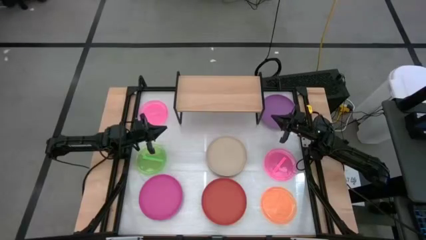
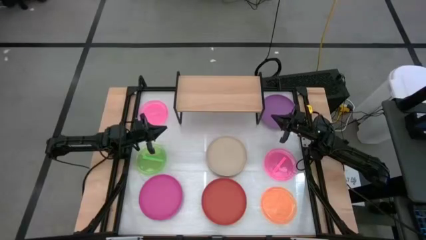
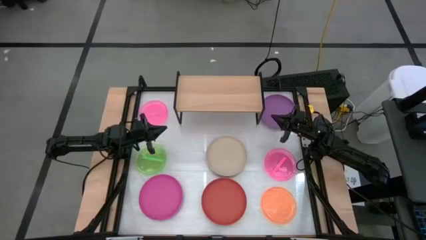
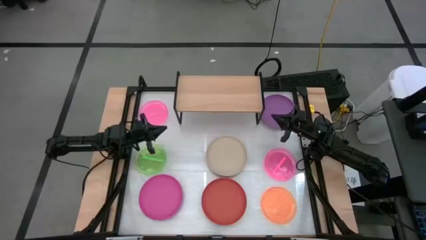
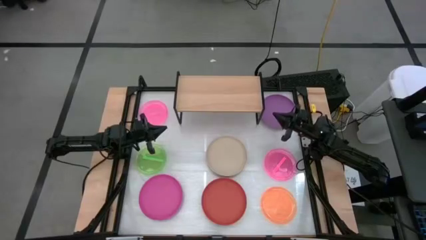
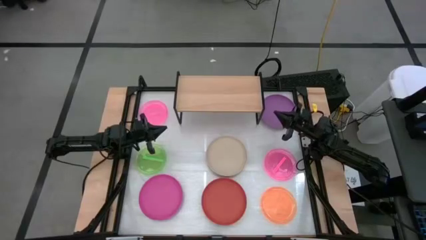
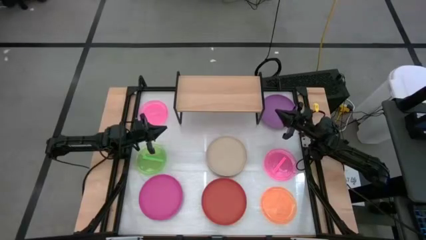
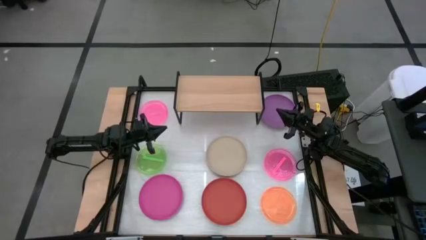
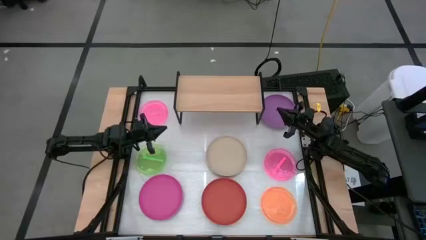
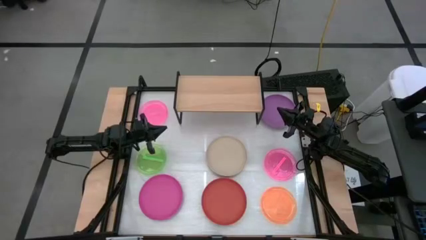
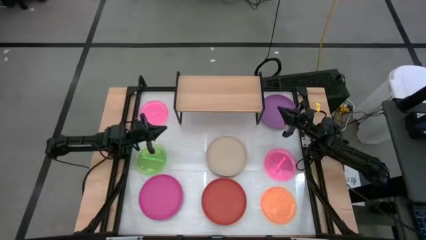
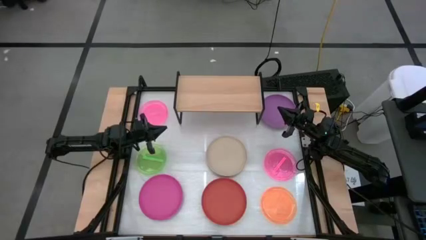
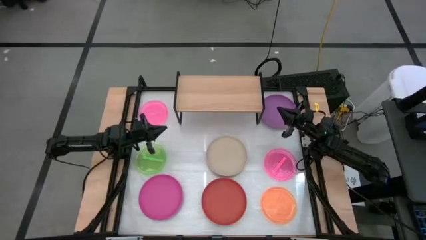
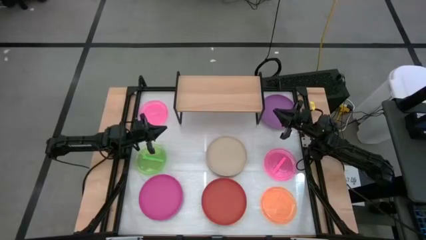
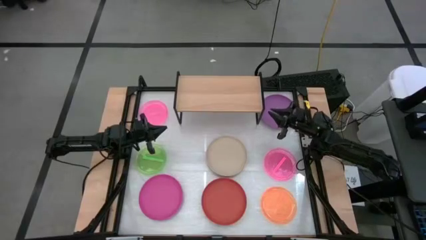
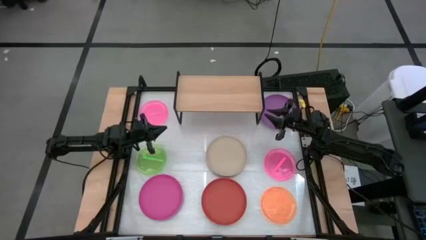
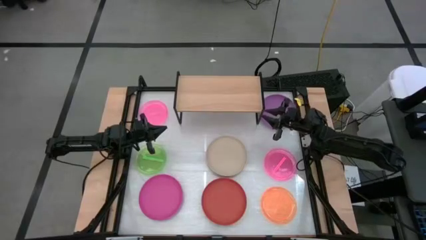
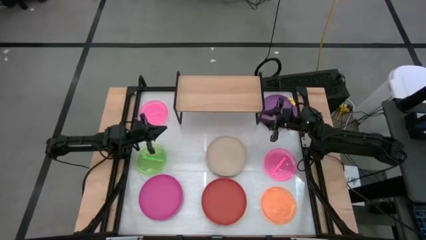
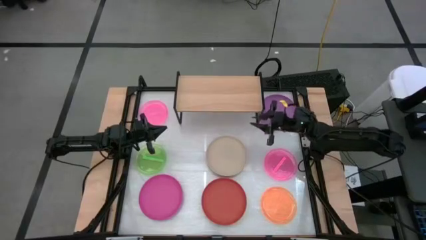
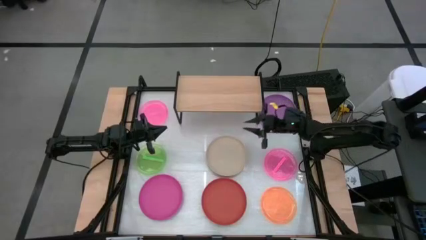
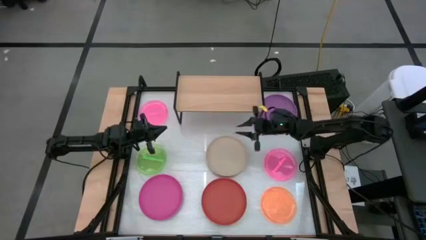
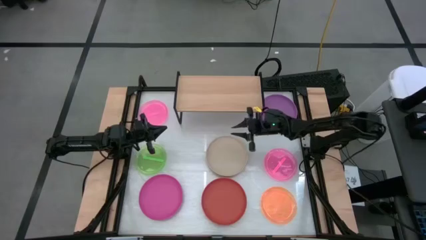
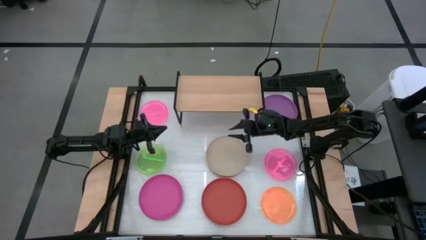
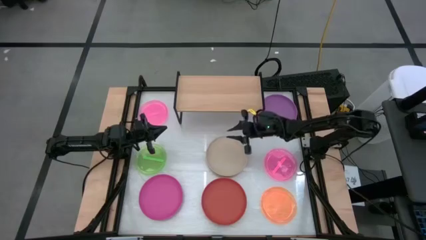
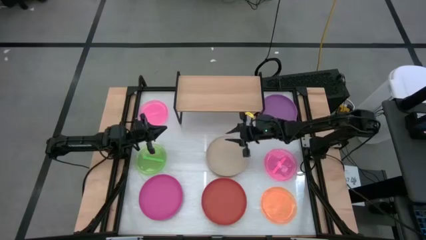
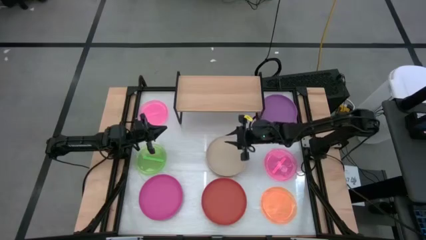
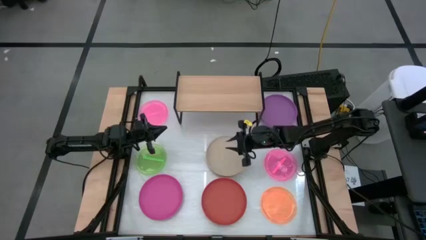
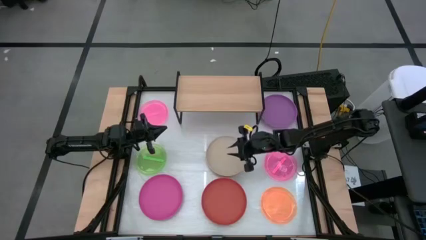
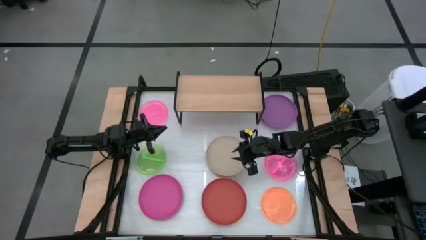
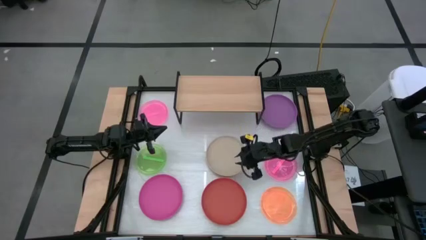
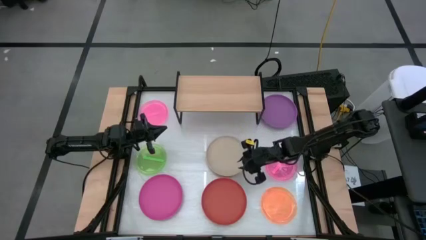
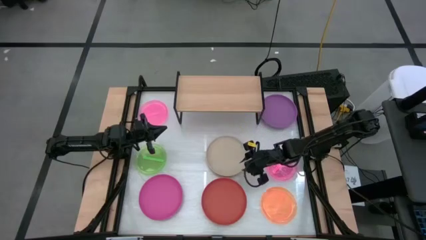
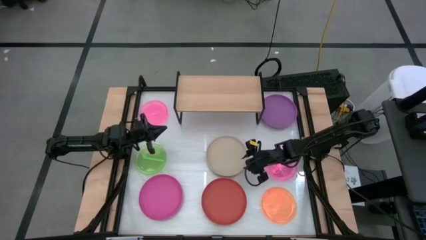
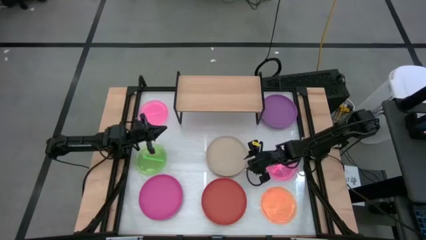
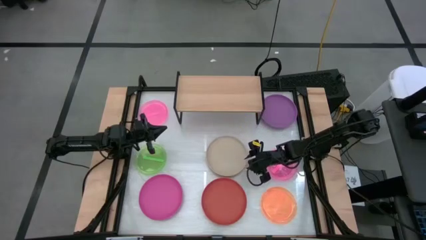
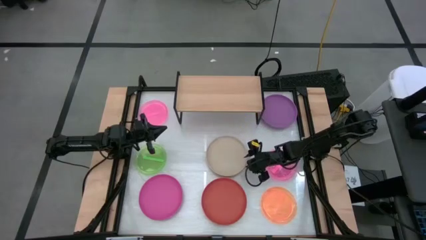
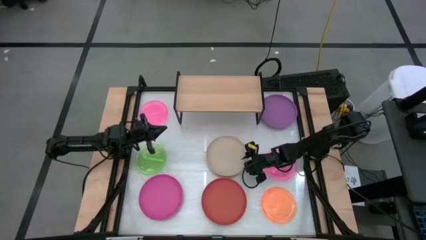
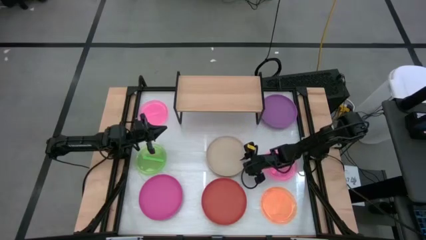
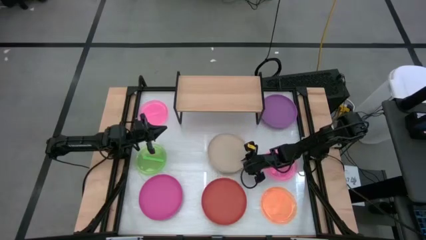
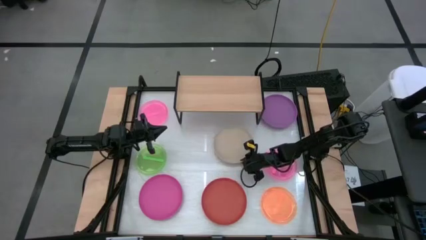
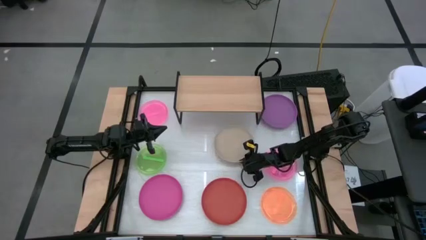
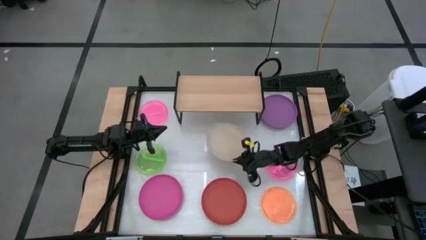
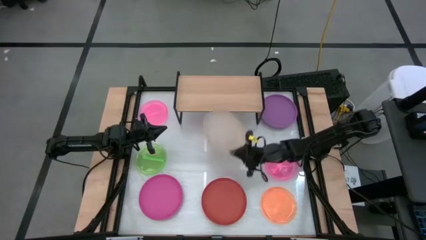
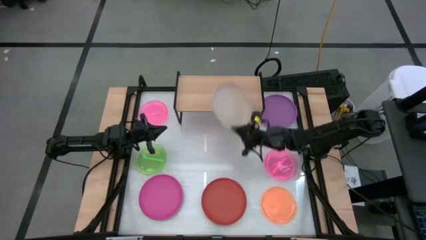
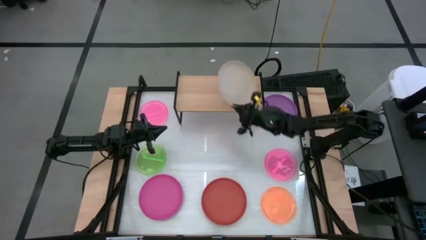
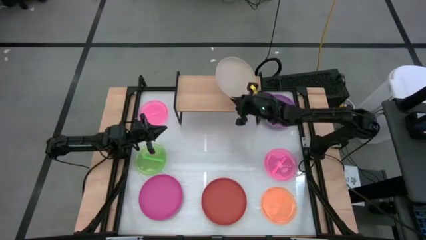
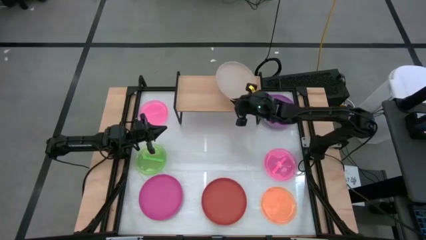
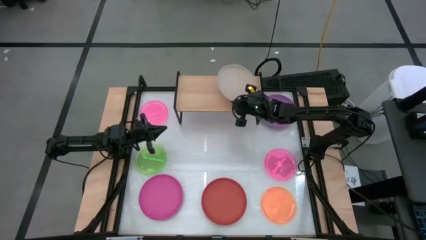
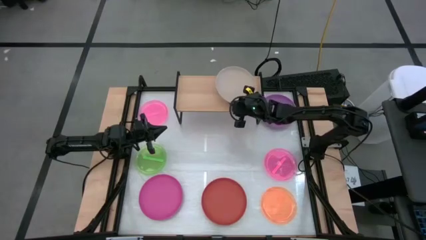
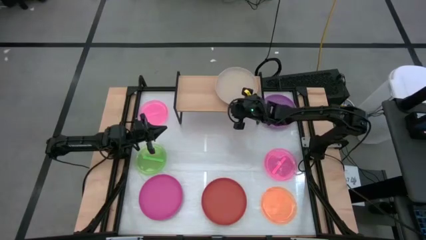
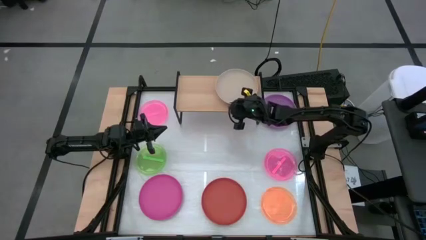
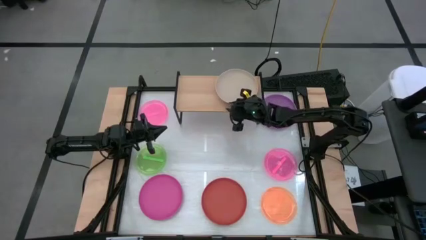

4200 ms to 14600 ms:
Task: Place and stack plates onto a shelf
Put the gray plate on the shelf

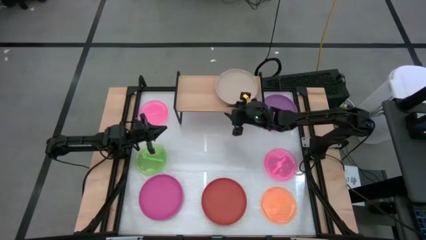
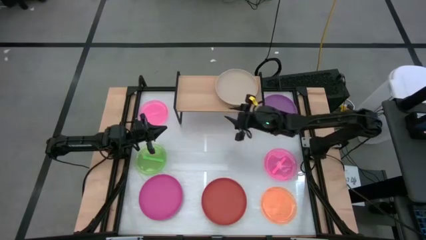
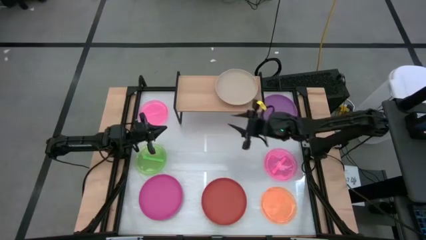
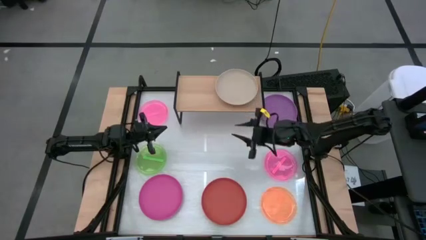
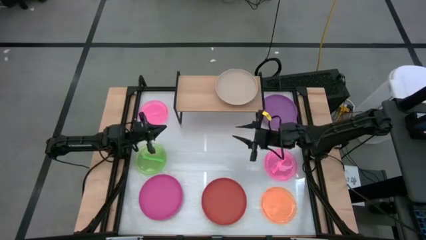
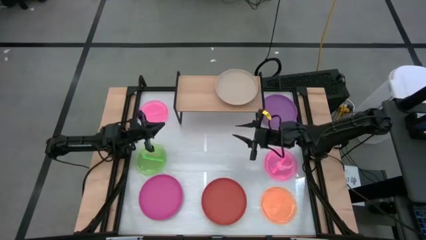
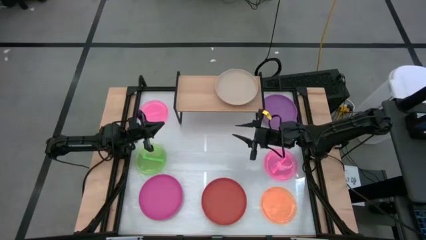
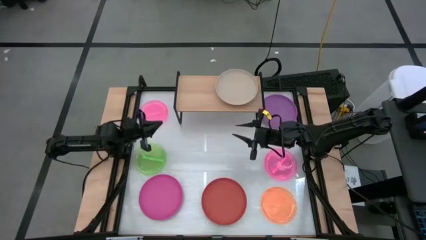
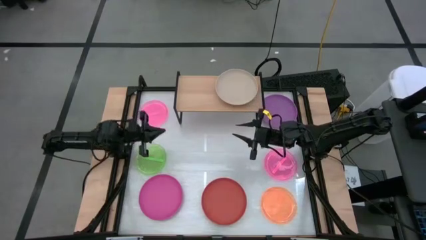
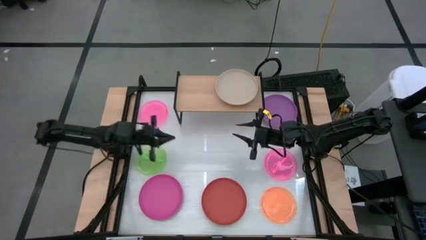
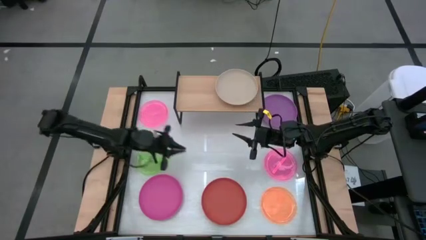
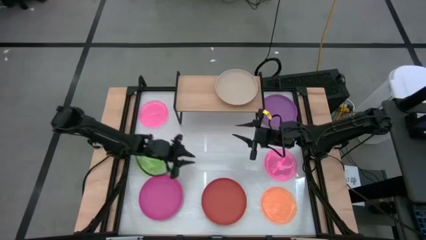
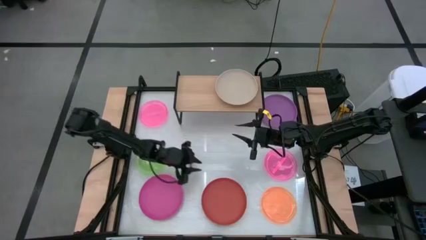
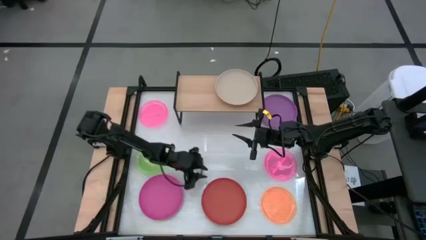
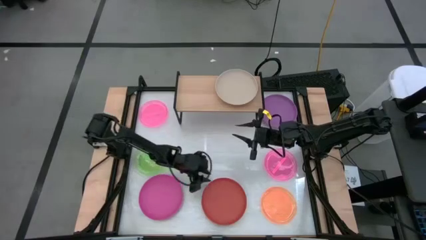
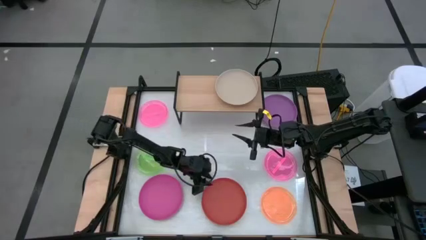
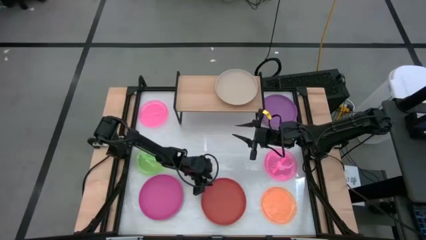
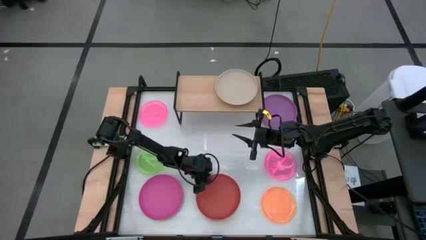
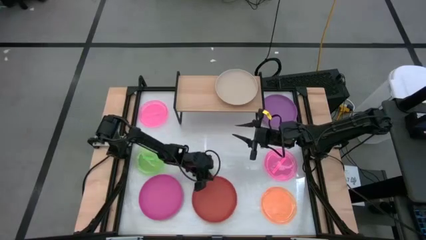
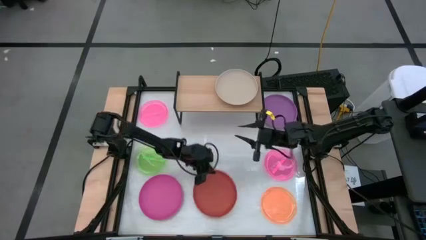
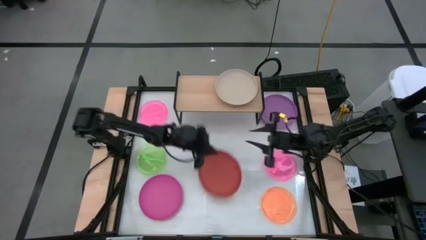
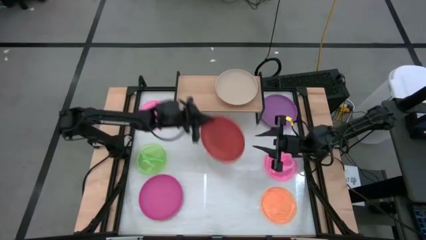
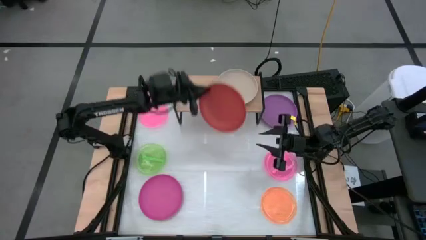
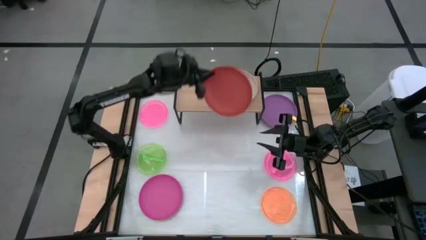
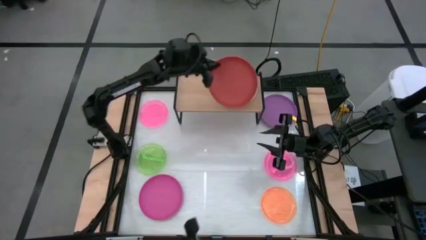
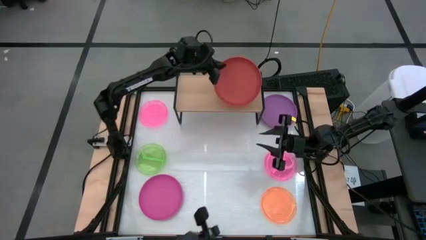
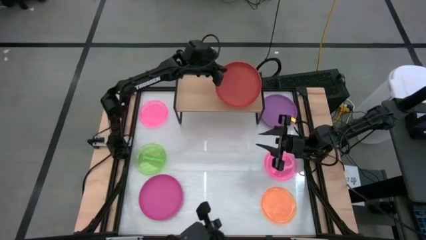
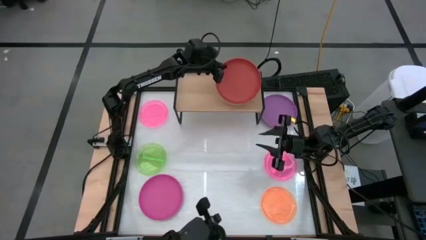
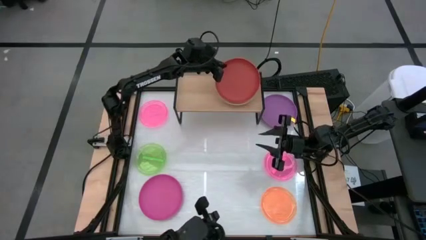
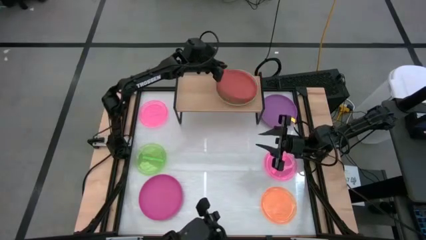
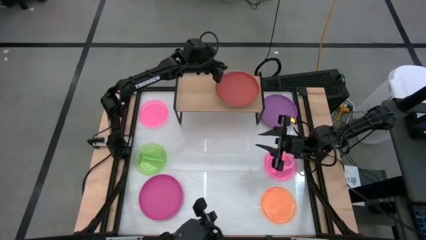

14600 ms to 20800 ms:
Stack the brown plate on top of the gray plate on the shelf
